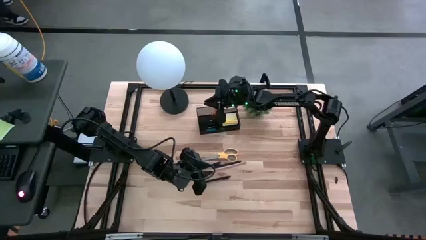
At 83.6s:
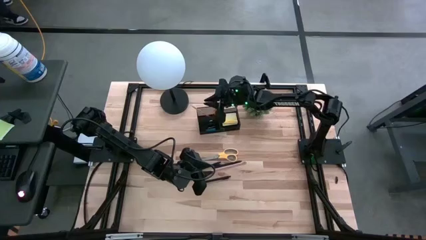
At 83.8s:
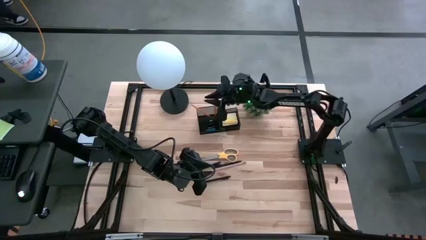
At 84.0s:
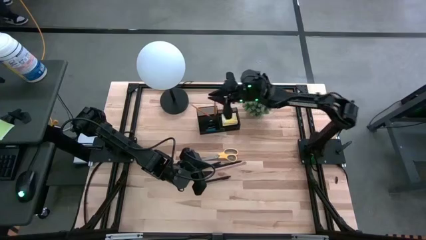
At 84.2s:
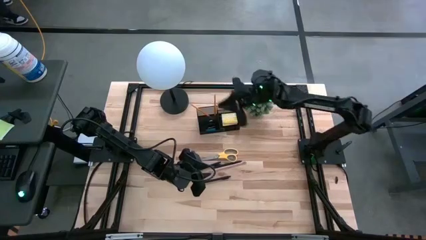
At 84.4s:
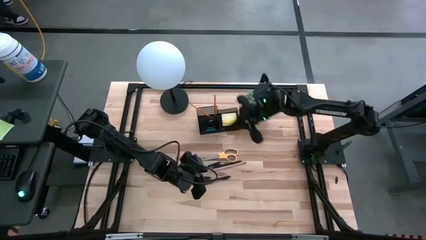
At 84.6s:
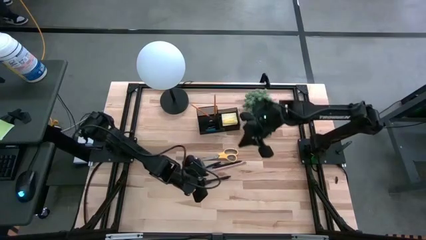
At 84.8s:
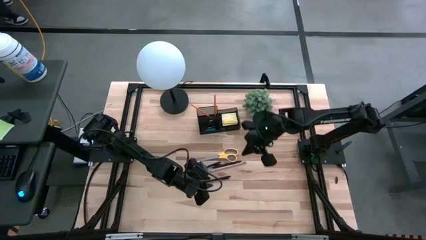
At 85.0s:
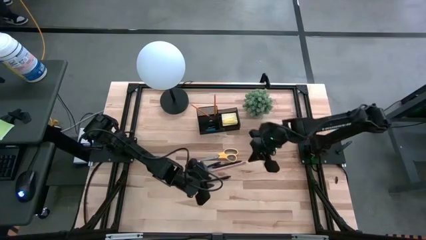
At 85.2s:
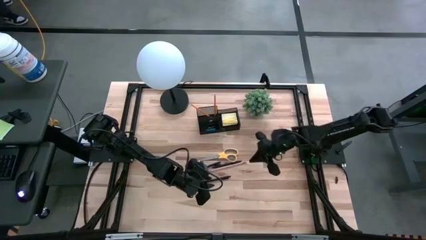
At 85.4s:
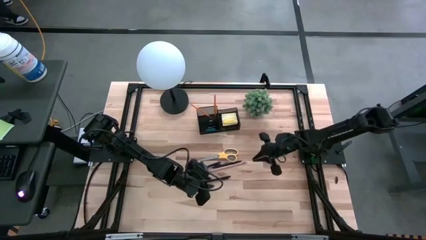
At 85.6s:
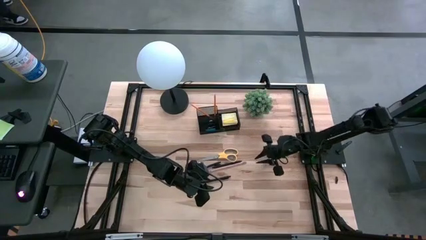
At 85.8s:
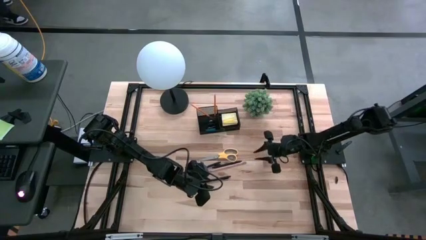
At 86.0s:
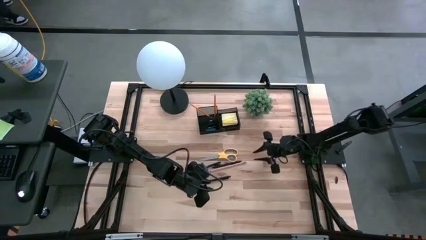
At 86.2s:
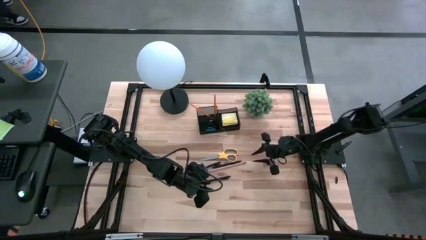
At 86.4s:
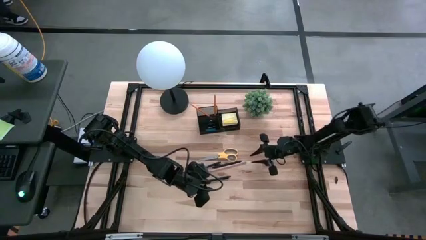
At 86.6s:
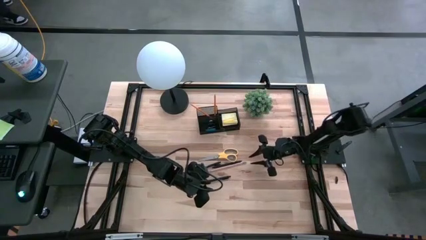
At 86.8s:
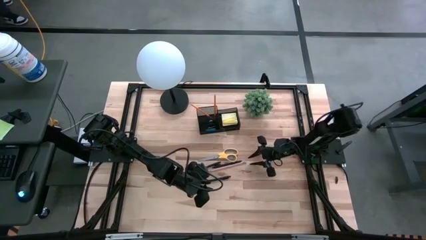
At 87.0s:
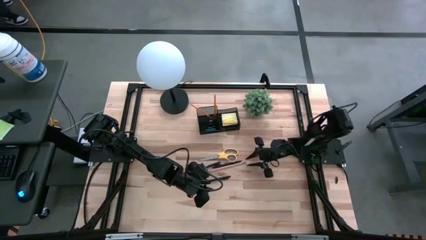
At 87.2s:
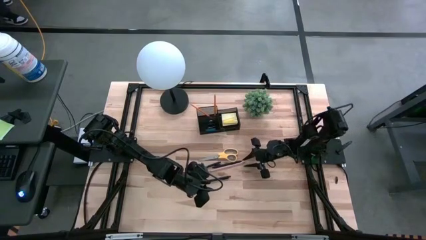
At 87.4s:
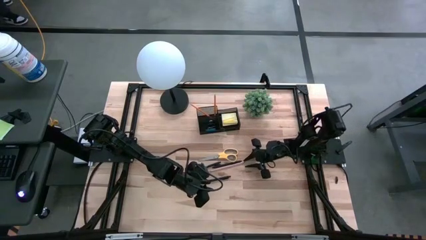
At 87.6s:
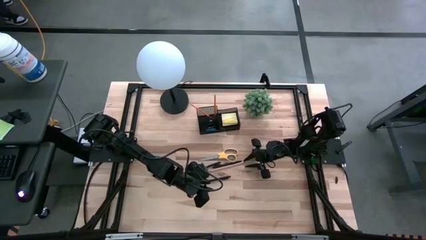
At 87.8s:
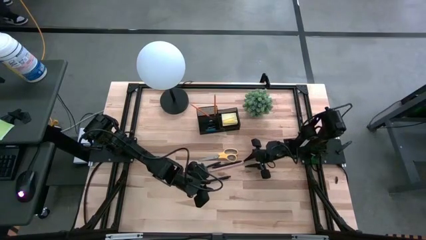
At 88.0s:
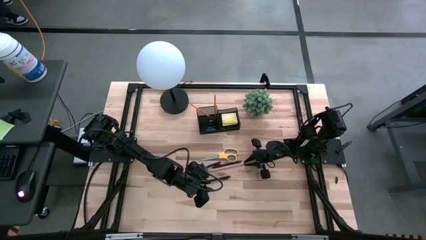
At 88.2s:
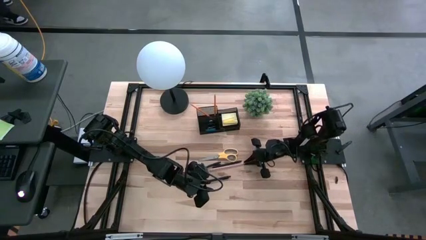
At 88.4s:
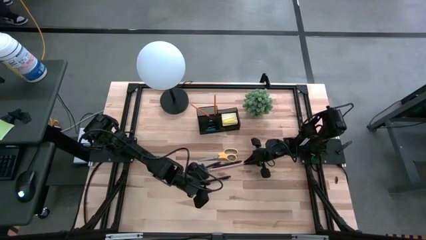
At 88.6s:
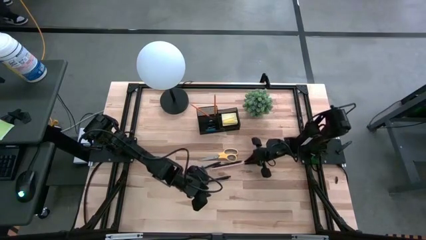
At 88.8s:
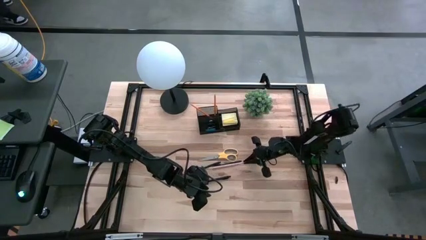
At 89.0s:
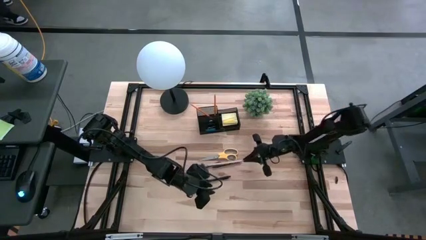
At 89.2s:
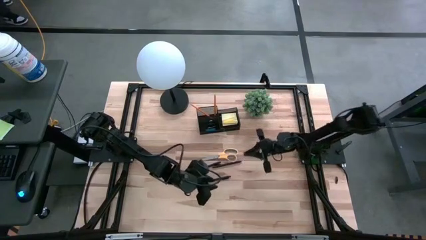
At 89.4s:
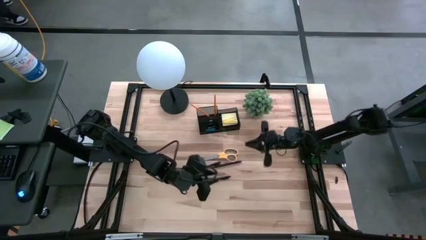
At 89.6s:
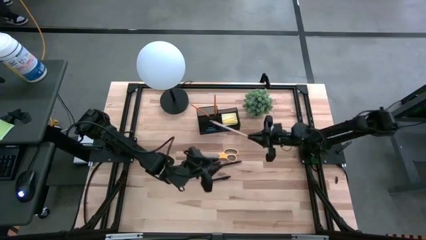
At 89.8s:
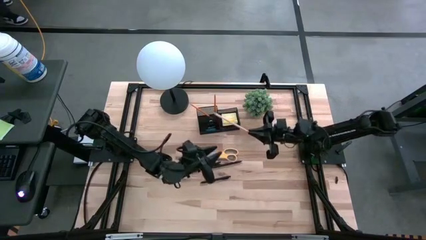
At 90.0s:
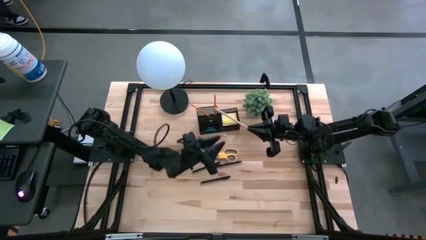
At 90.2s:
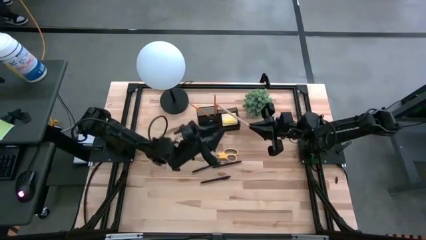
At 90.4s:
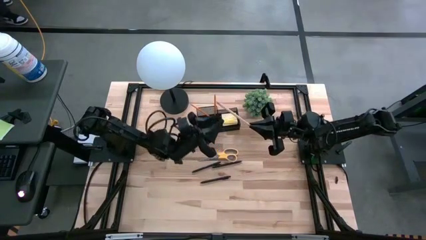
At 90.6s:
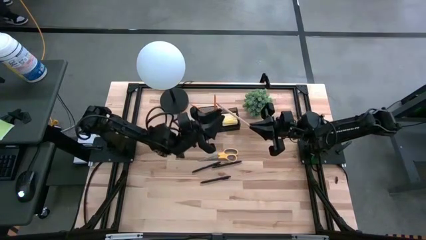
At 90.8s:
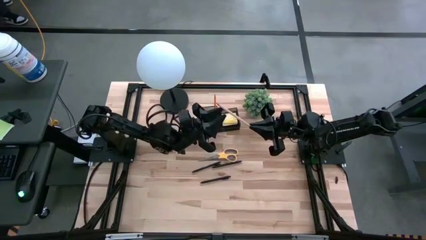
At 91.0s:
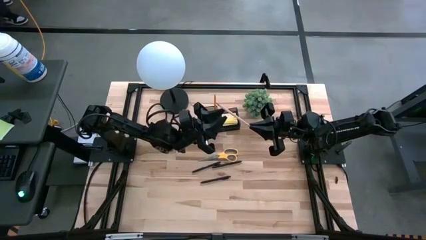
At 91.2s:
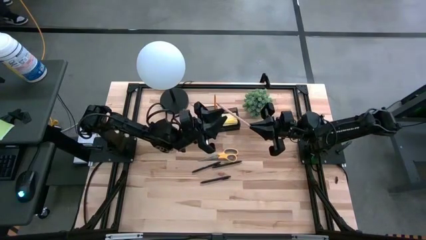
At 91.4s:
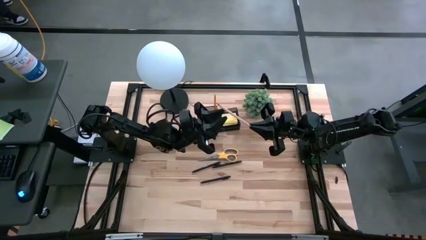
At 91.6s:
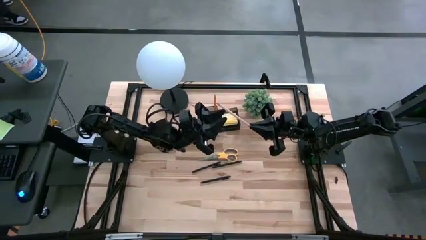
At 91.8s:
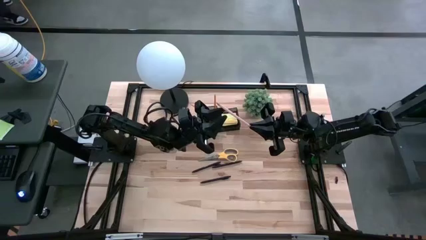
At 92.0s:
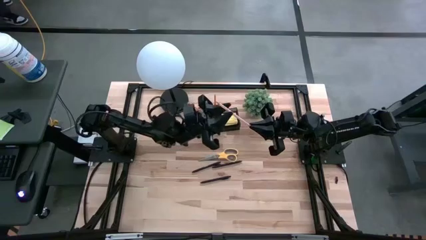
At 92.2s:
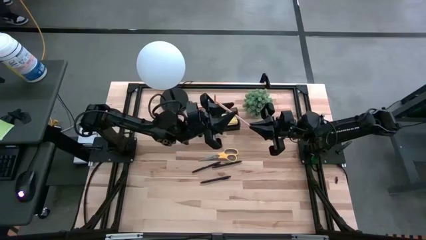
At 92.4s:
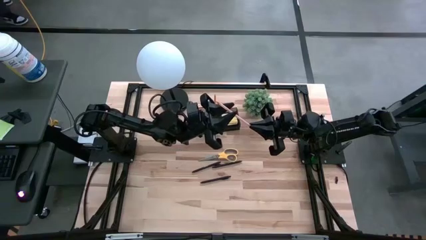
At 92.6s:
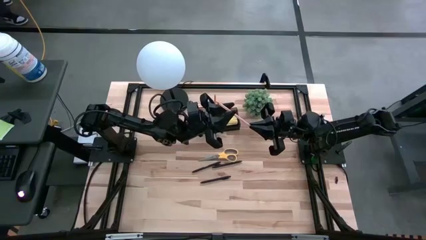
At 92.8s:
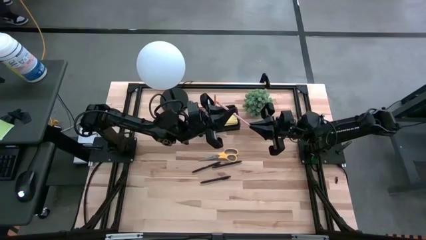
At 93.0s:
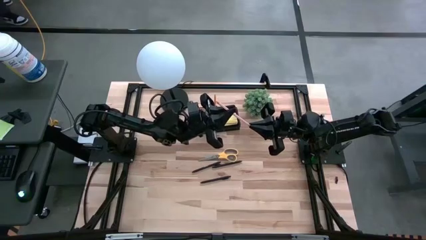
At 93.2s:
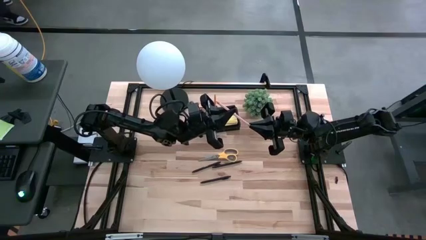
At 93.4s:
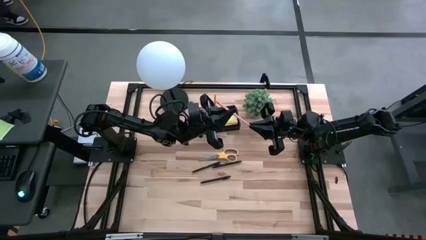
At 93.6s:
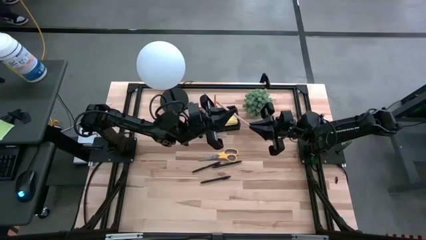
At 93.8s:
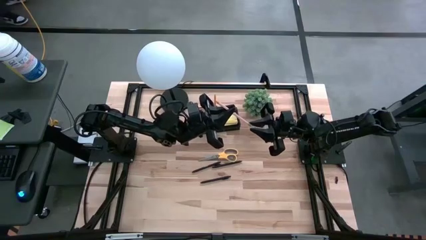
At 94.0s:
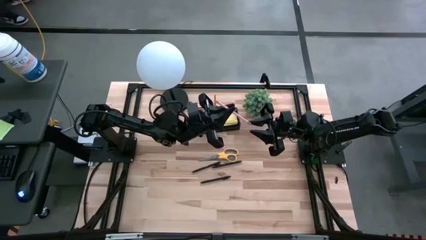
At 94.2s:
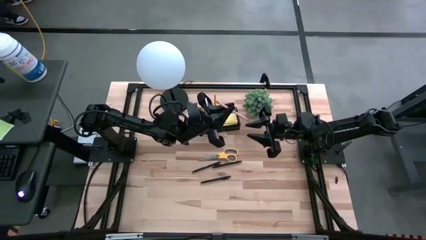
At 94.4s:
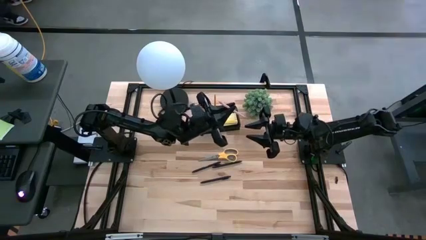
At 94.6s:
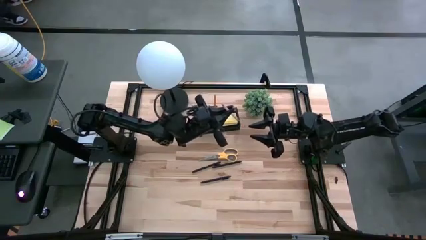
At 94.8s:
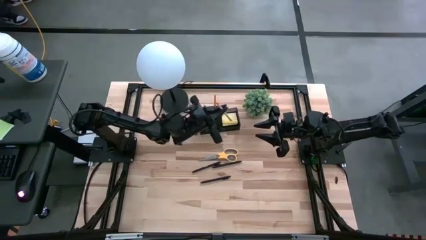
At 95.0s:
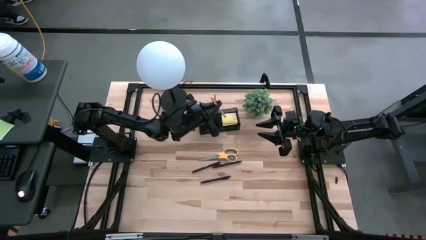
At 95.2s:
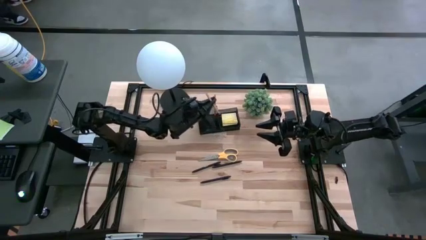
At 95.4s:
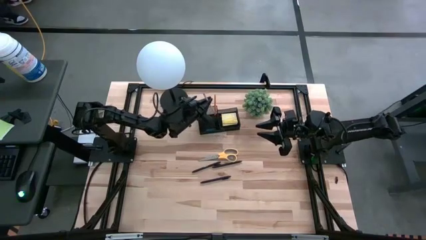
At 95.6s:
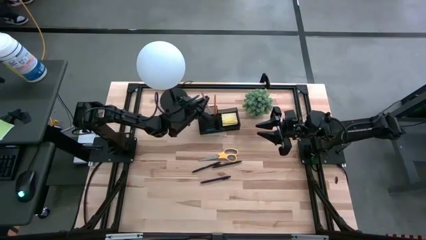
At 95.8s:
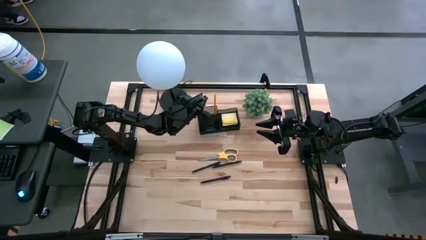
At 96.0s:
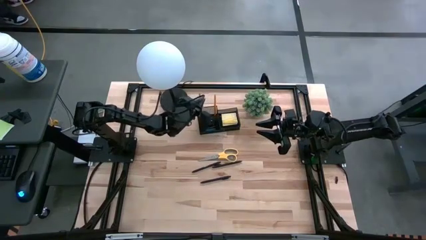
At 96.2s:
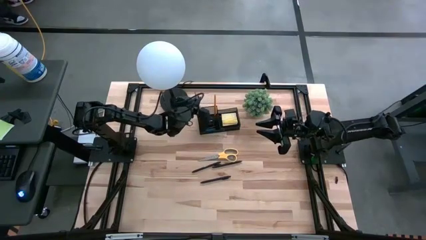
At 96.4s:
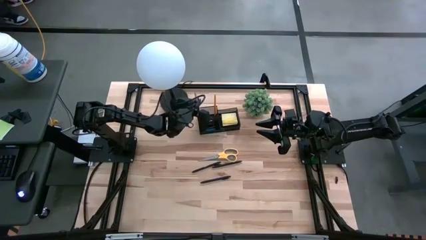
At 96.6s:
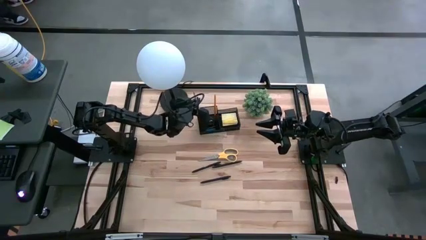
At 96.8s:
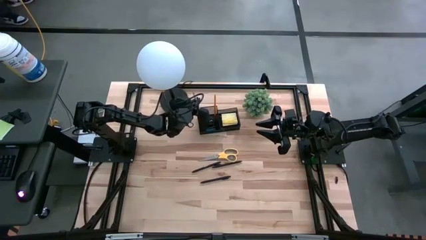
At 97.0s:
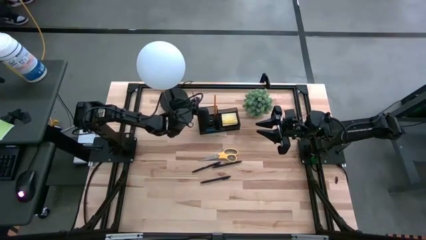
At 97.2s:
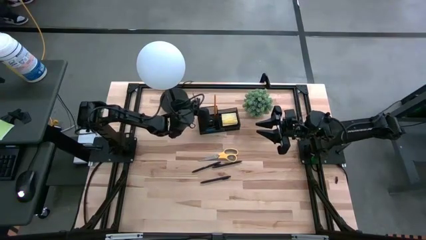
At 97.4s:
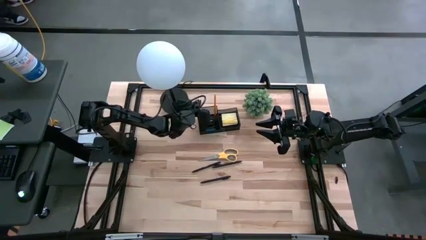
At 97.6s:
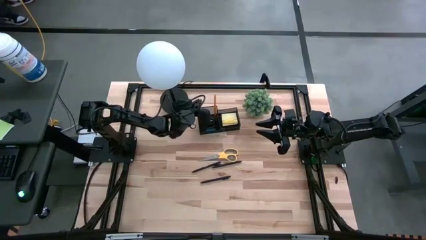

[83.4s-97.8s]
Task: Pick and place office supplies into organizer
Put the wooden pencil into the desk organizer

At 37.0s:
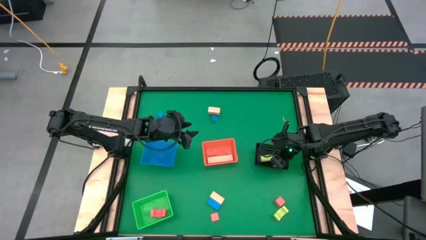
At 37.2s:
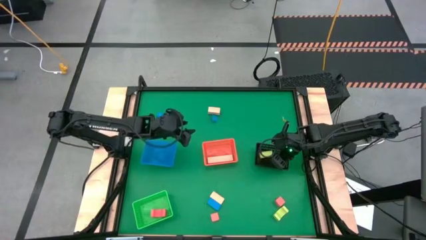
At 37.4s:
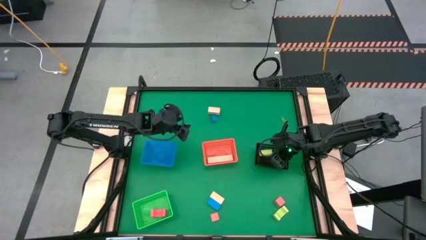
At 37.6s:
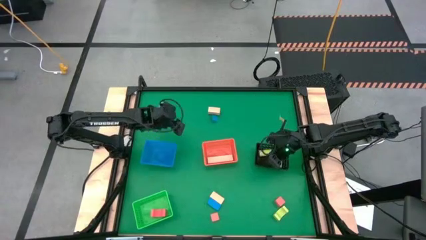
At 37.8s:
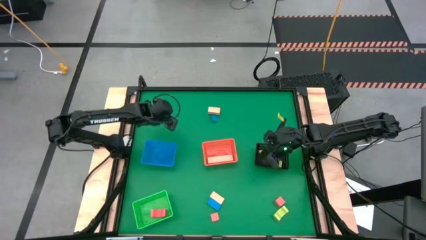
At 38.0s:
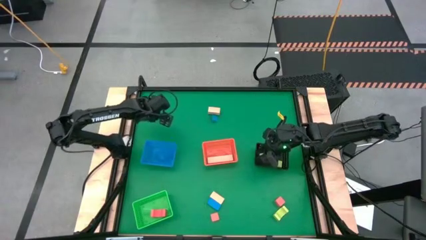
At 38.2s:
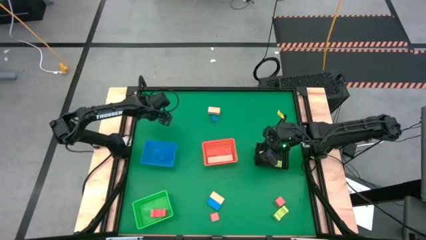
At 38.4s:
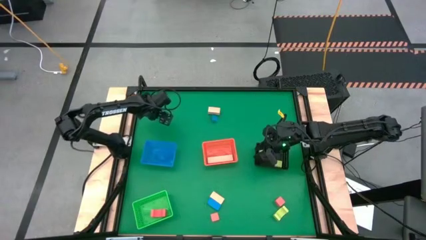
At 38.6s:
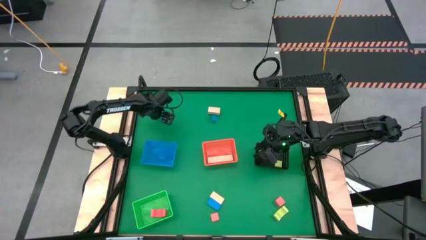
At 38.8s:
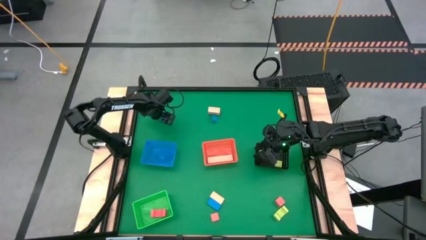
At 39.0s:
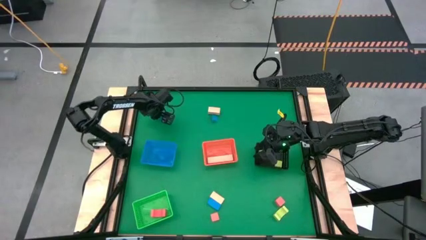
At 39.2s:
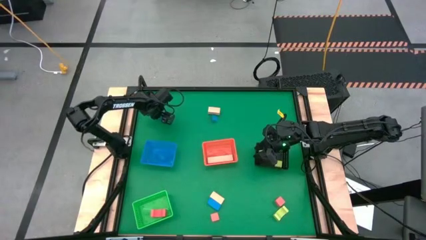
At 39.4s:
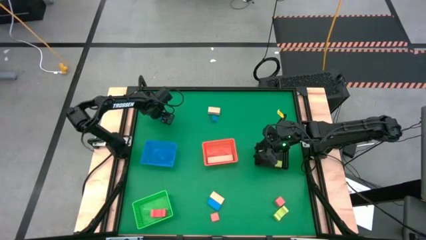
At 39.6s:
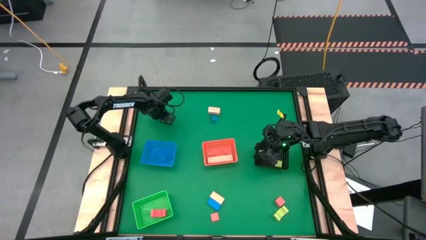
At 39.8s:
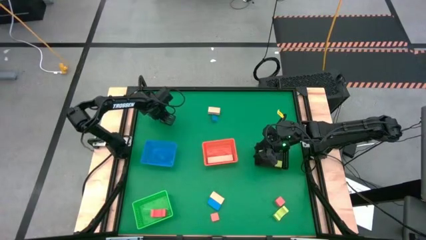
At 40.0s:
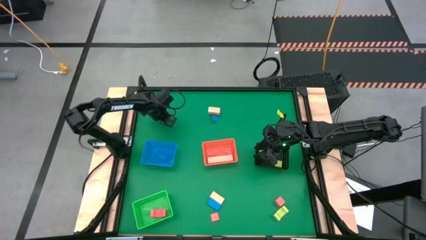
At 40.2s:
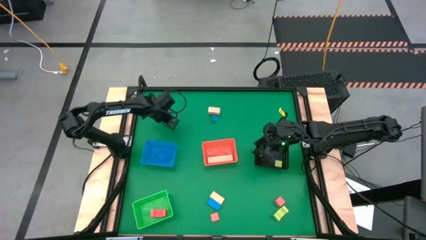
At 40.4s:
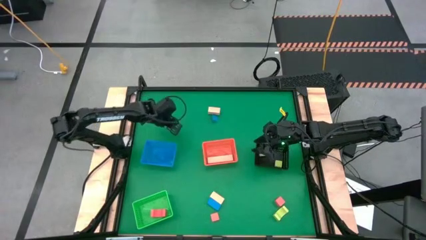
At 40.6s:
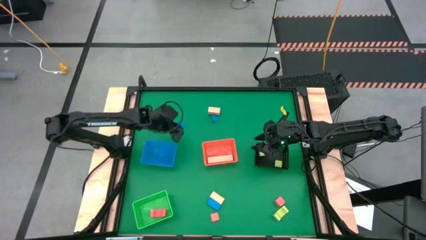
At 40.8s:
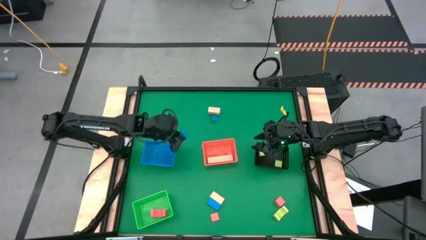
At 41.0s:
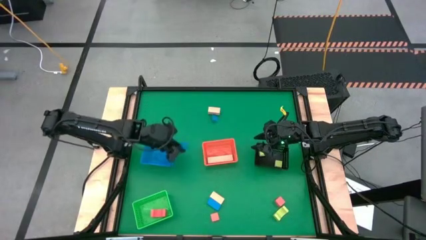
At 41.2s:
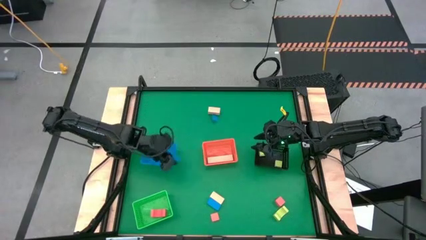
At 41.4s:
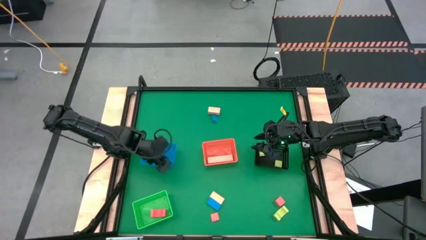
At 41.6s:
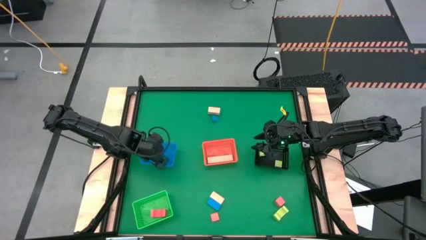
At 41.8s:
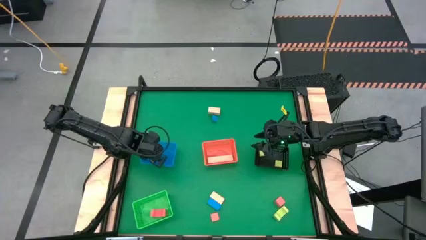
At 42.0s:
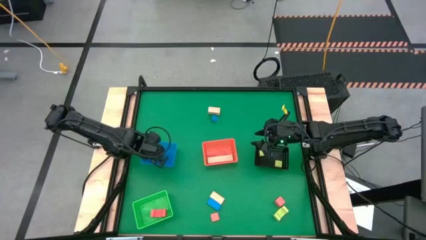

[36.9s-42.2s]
Task: Sort & place blocks by color
Put the top left blue block into the blue bin
